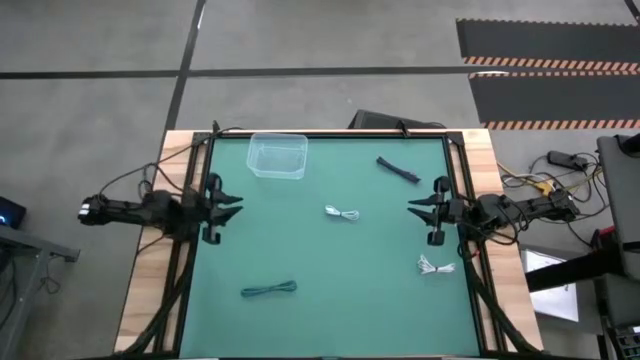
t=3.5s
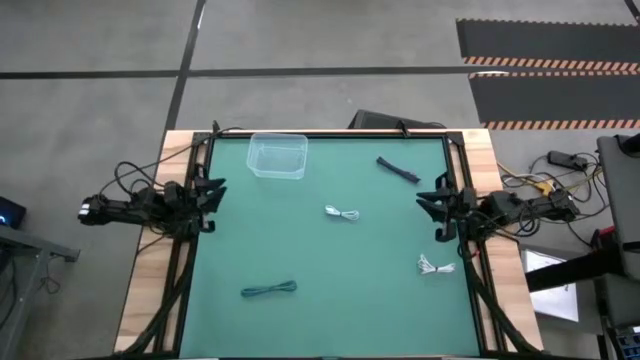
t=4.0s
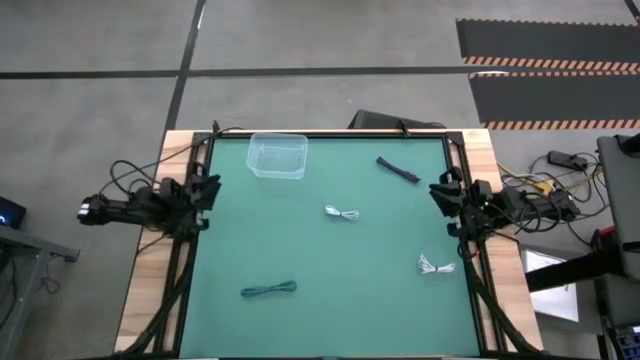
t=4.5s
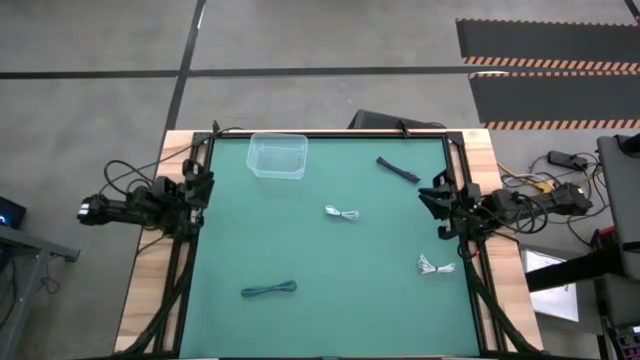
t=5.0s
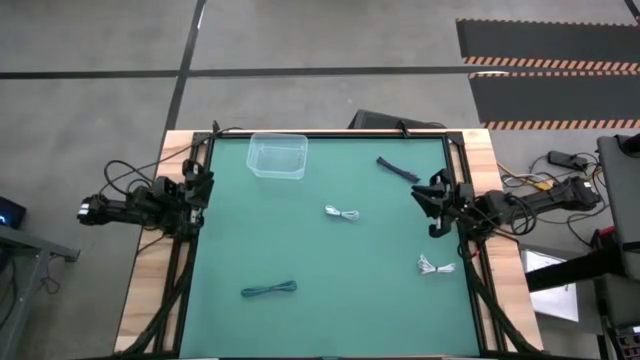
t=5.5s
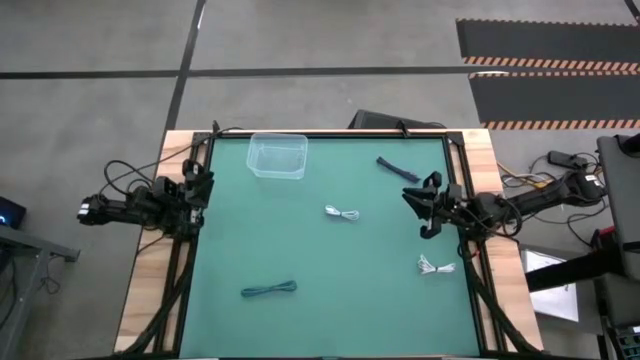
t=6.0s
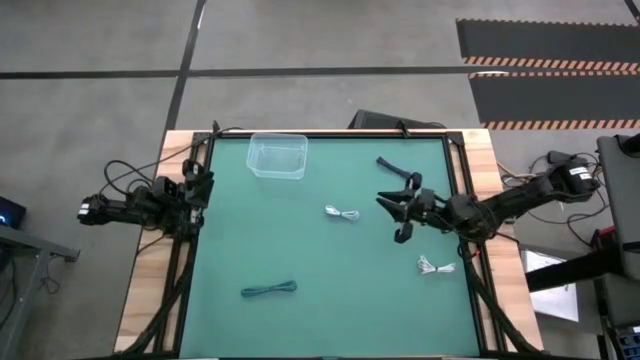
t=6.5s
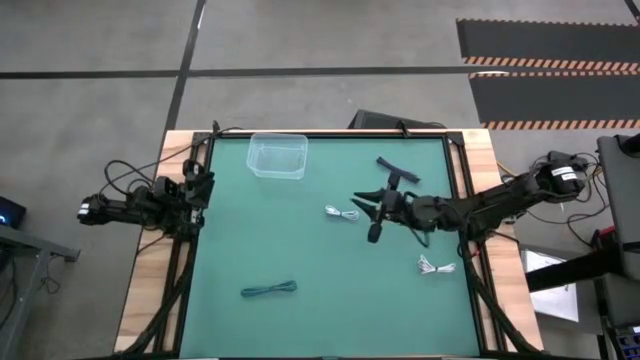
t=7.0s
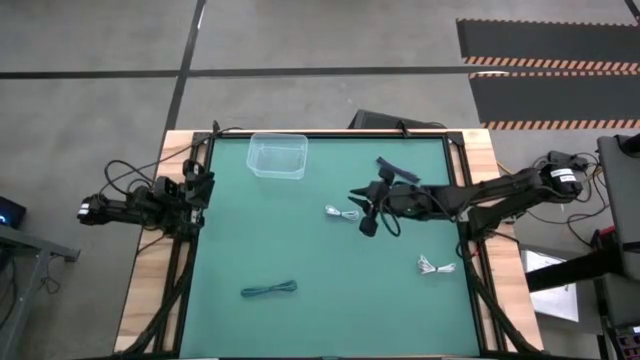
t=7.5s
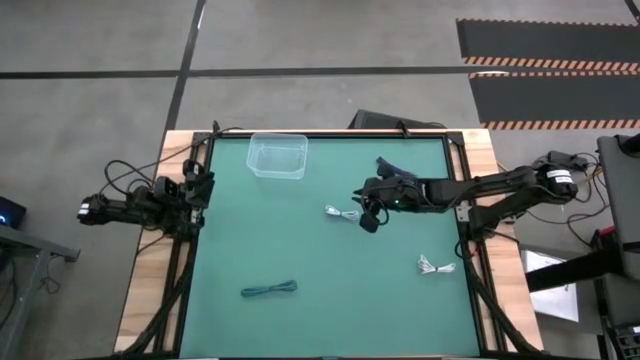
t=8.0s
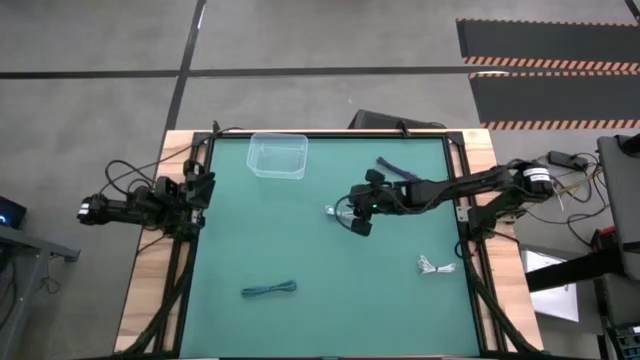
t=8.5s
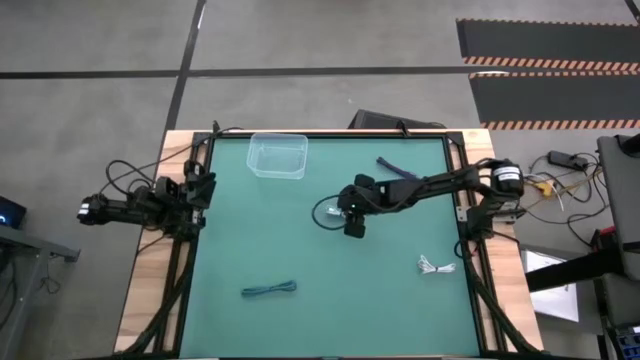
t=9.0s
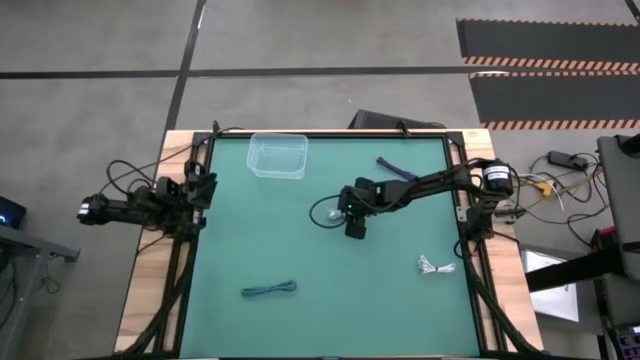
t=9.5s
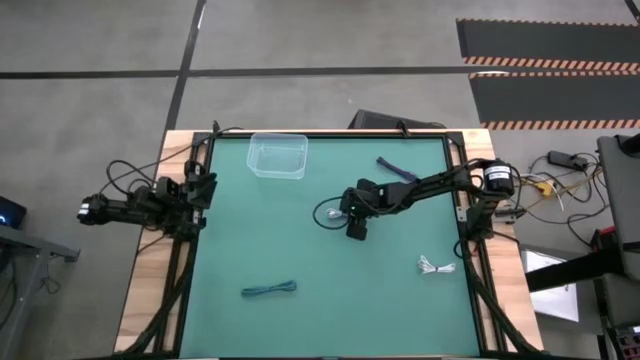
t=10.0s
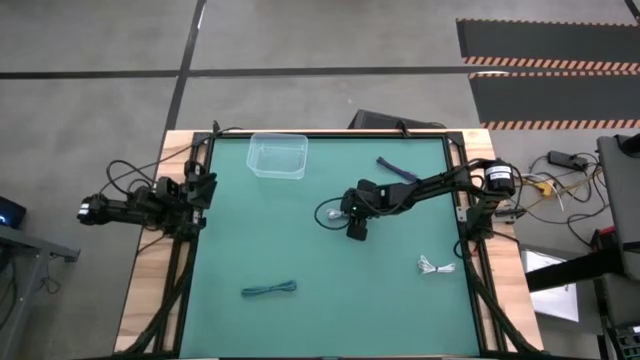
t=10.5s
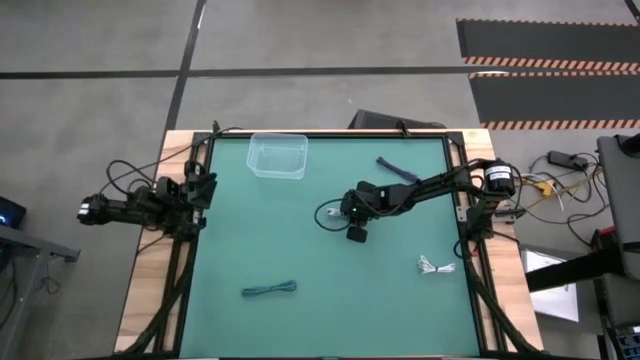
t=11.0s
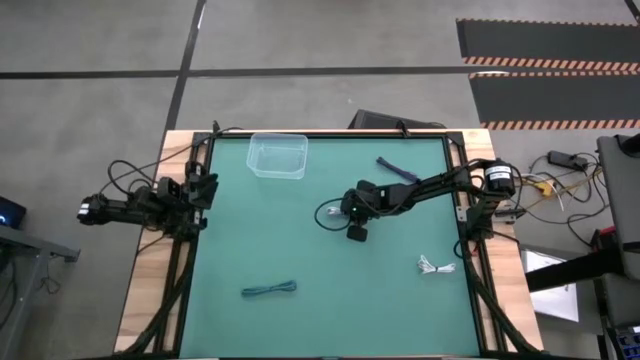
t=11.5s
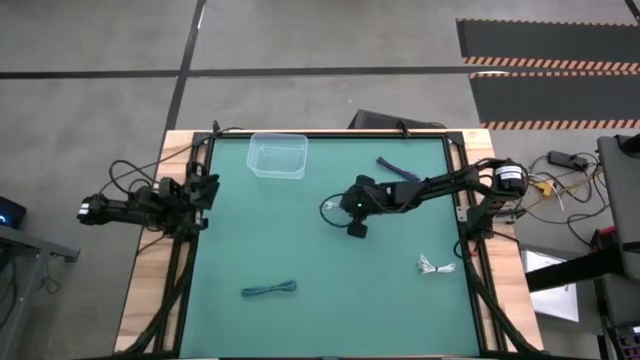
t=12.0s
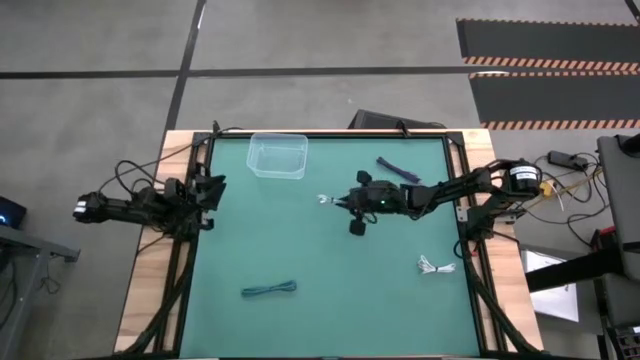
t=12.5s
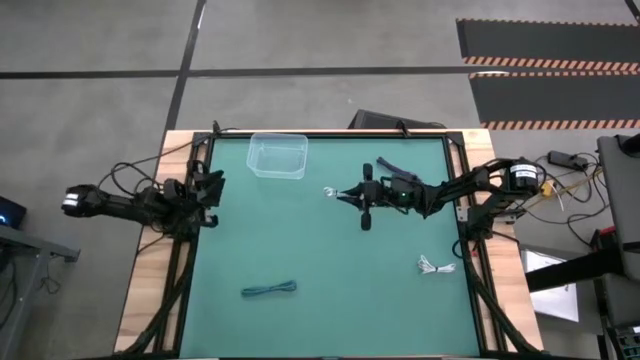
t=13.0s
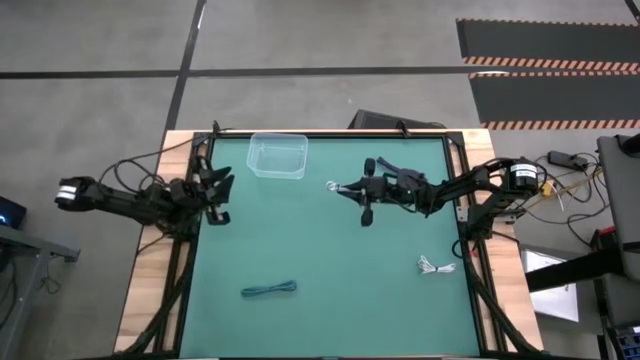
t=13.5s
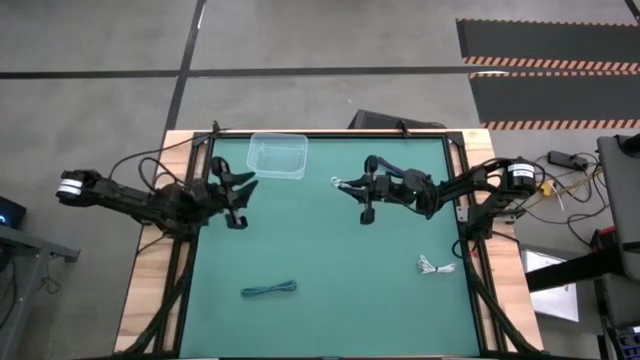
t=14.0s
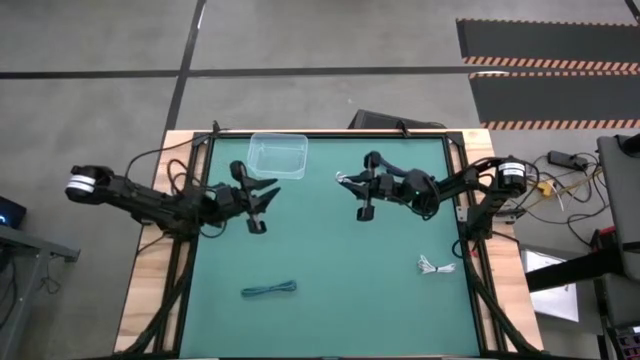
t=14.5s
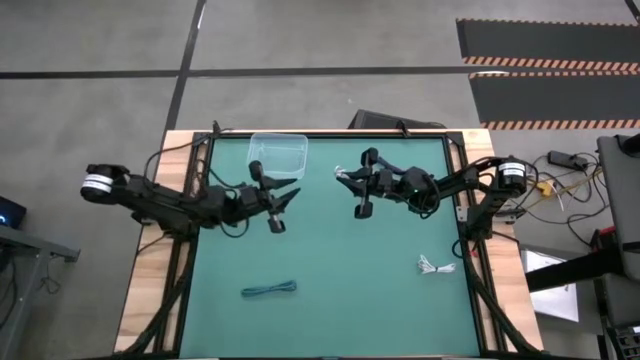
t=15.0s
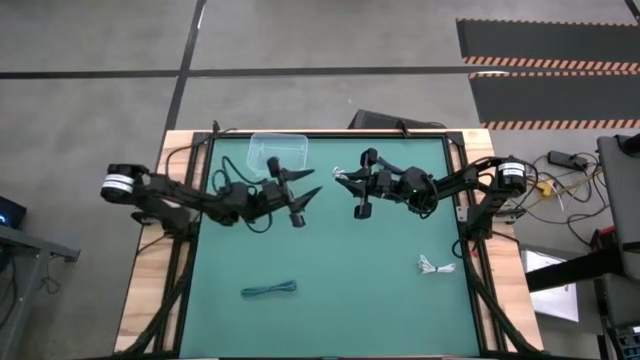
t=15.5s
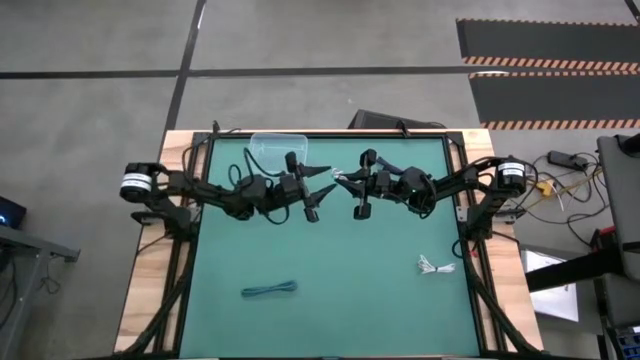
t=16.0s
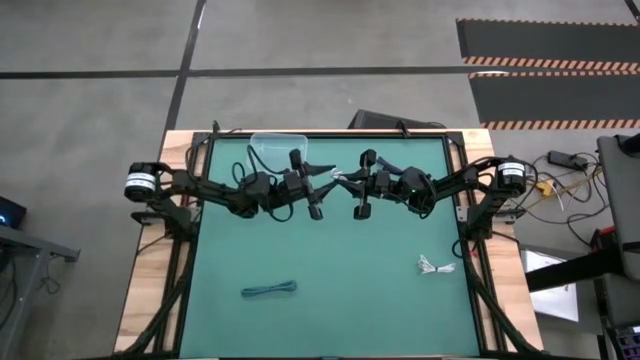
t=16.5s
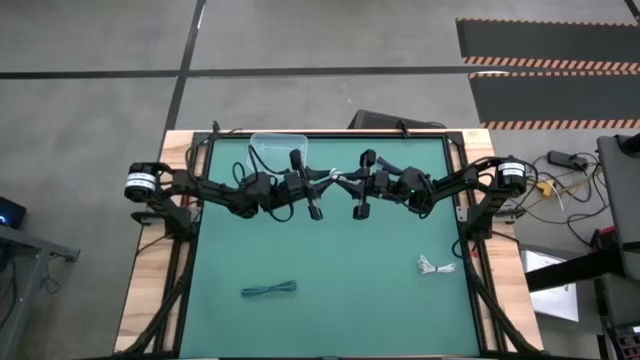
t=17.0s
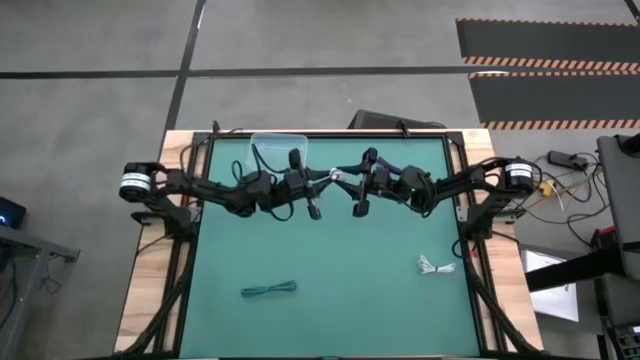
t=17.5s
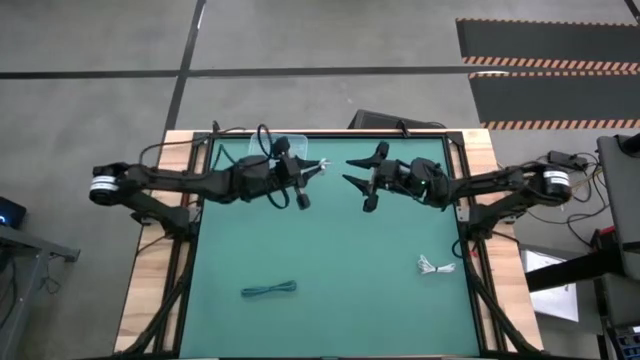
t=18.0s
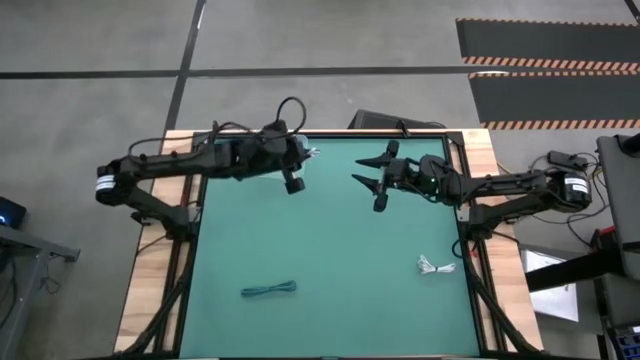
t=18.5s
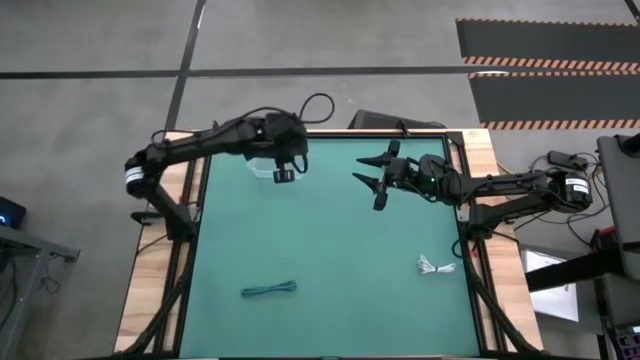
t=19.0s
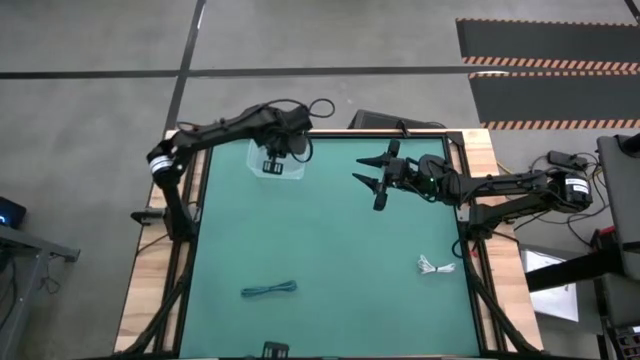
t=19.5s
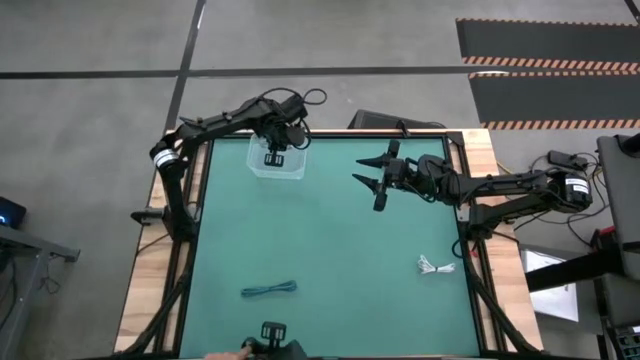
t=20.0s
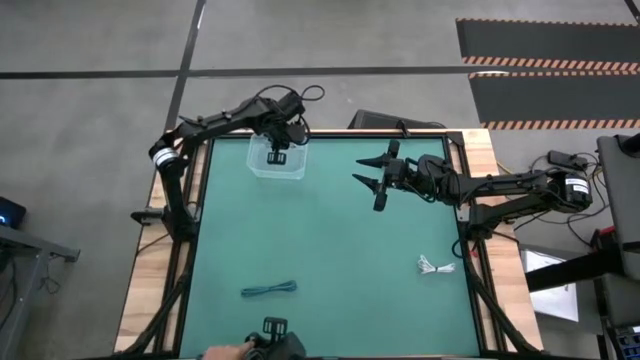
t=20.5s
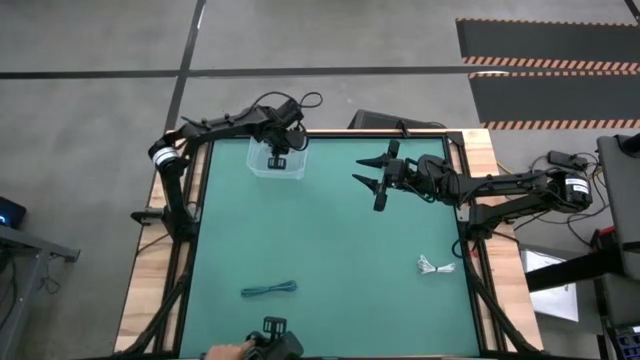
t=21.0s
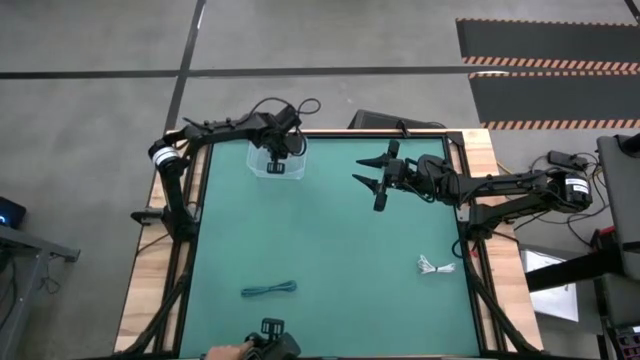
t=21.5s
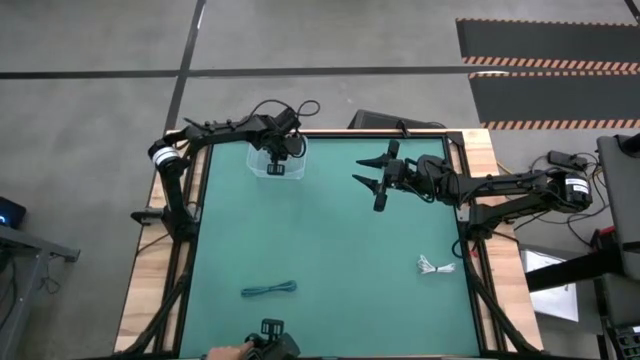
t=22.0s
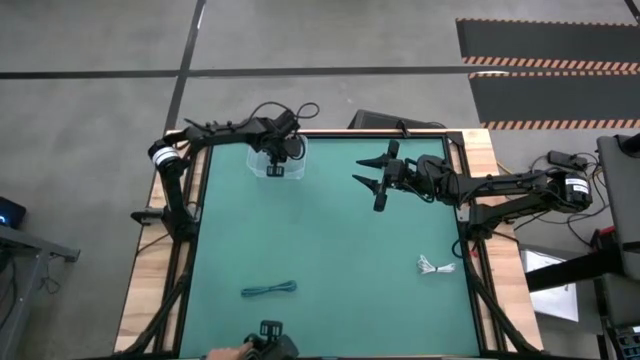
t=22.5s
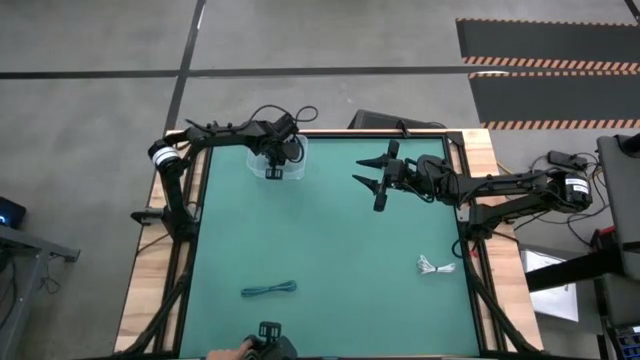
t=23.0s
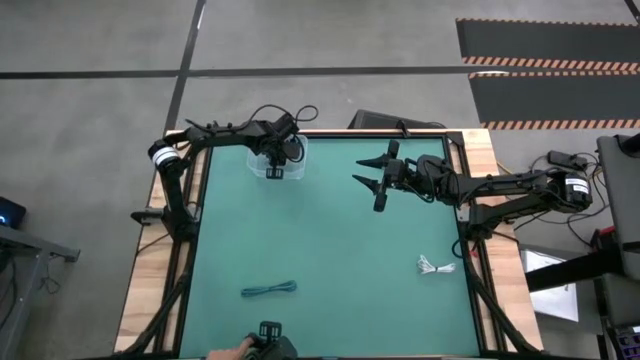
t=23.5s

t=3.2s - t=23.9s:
Task: Pick and place USB-C Cables
Put the light blue charger cable into the transparent bin
